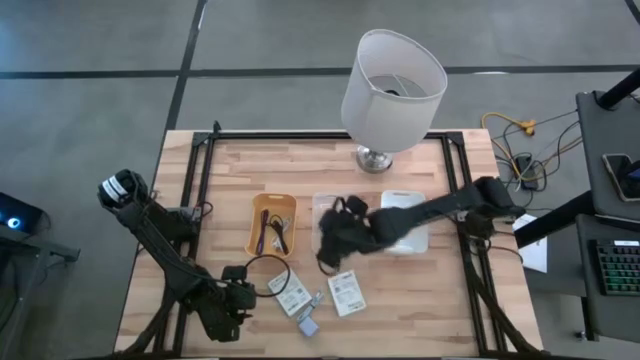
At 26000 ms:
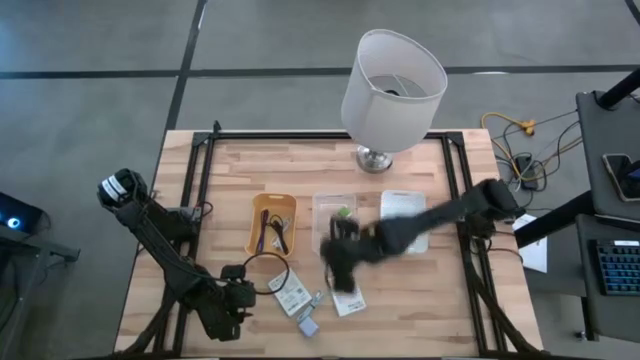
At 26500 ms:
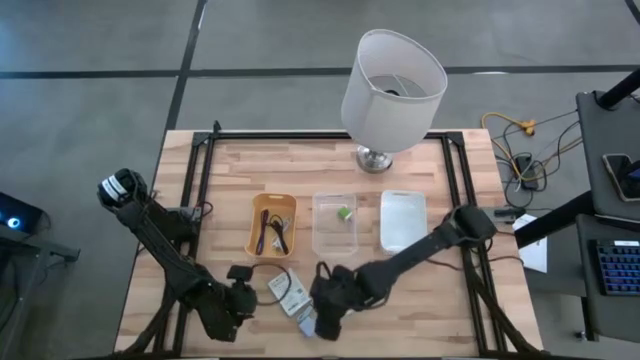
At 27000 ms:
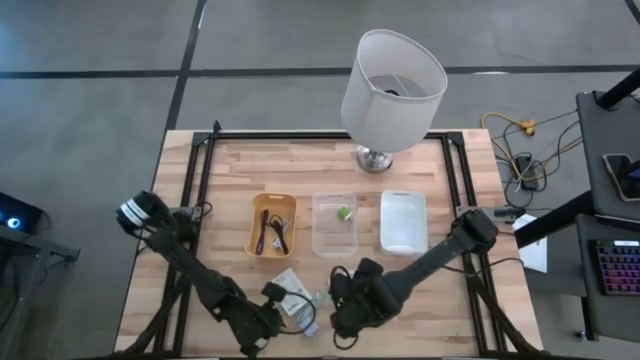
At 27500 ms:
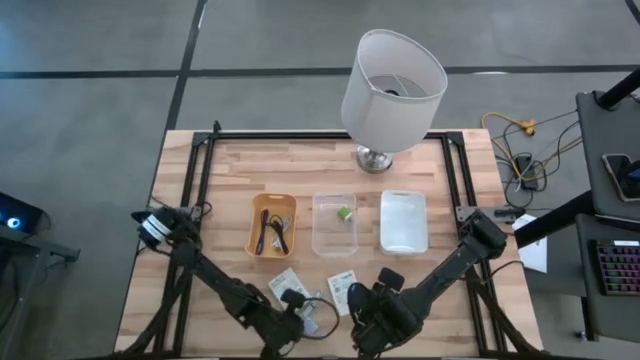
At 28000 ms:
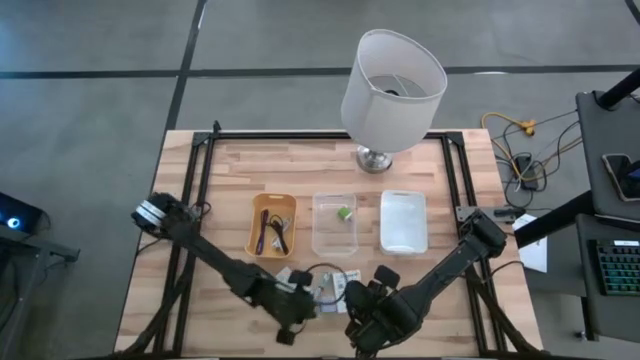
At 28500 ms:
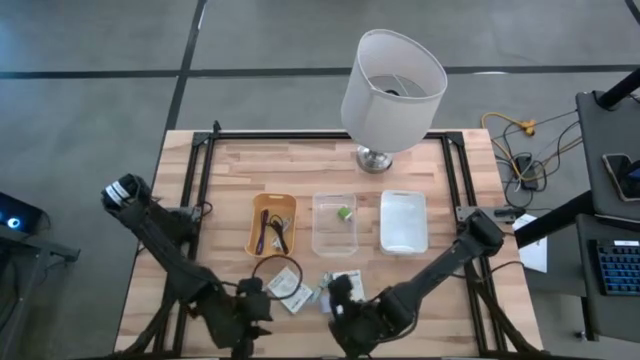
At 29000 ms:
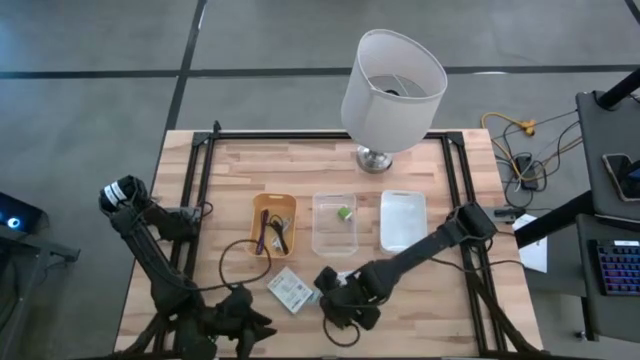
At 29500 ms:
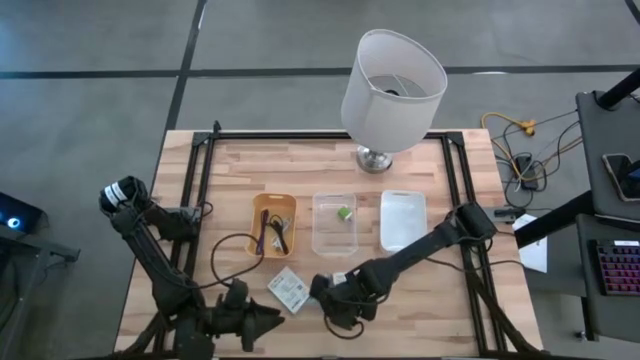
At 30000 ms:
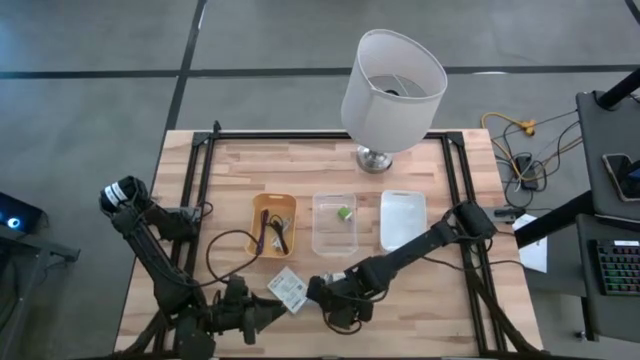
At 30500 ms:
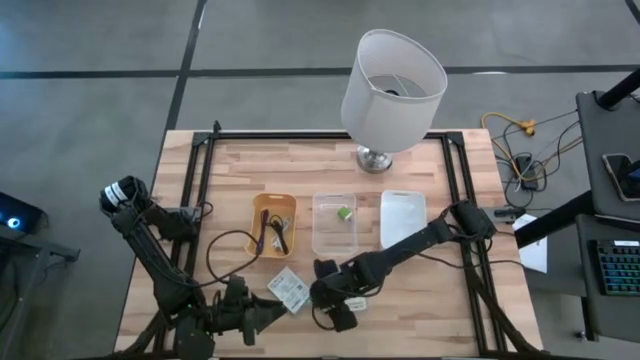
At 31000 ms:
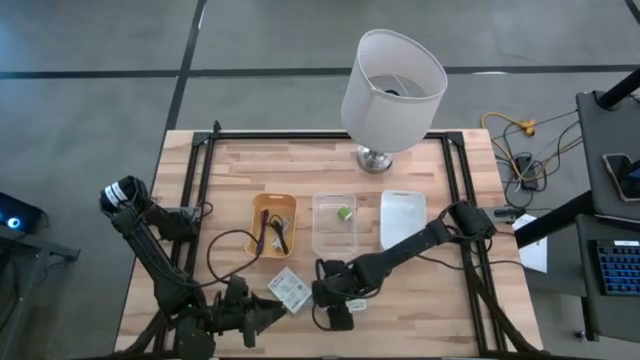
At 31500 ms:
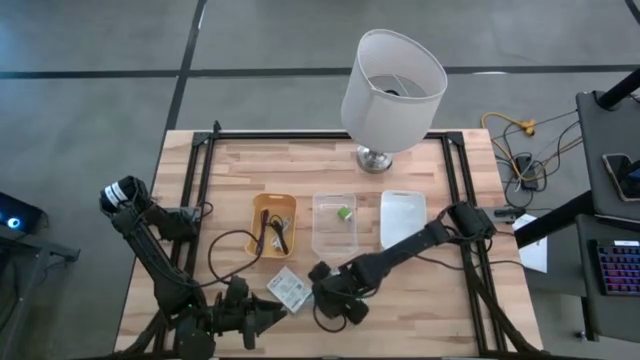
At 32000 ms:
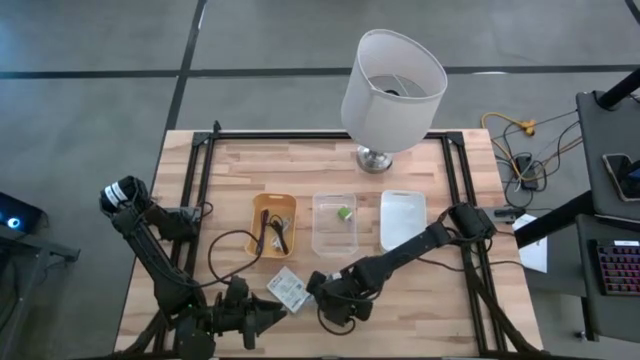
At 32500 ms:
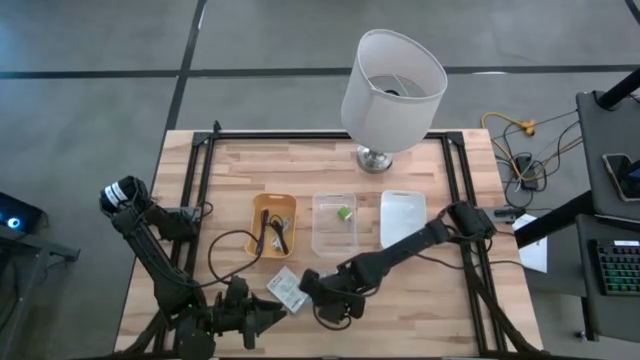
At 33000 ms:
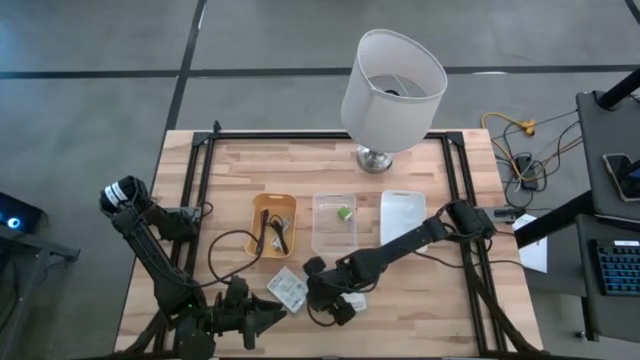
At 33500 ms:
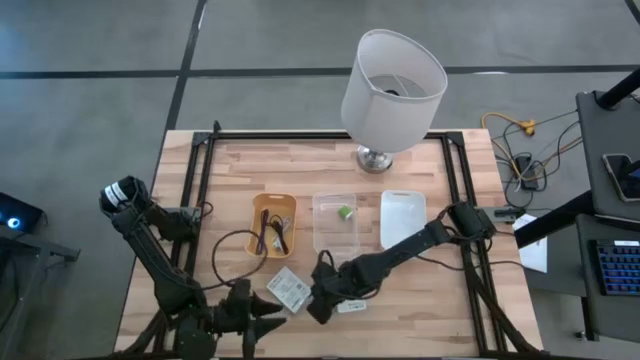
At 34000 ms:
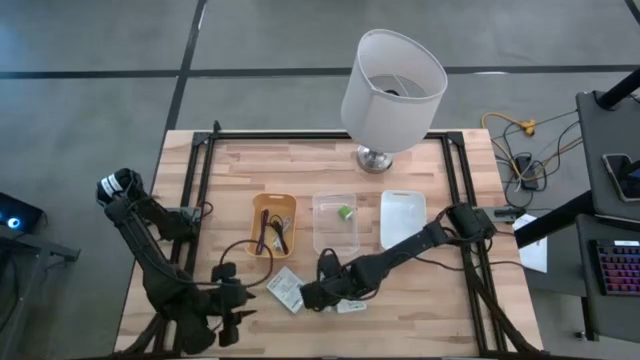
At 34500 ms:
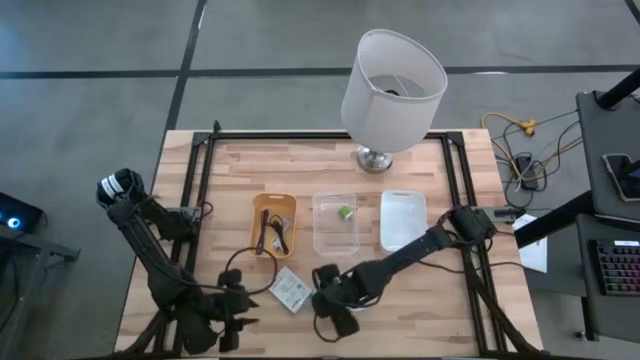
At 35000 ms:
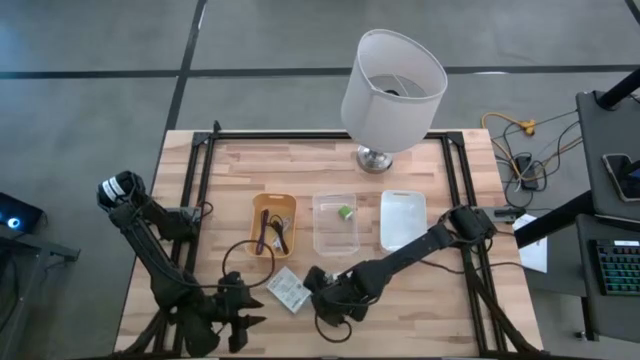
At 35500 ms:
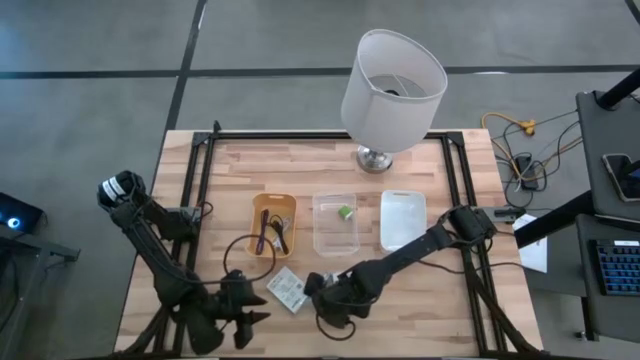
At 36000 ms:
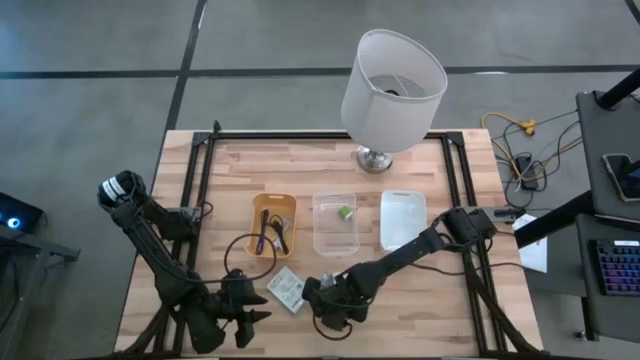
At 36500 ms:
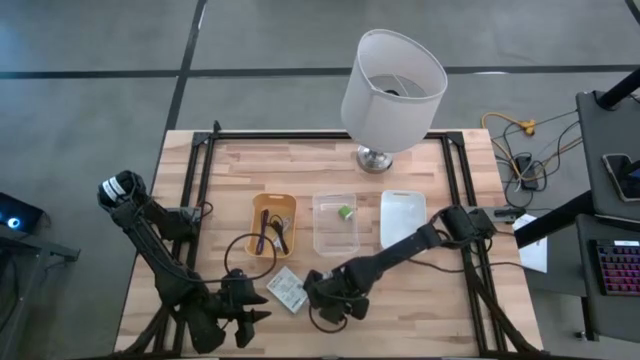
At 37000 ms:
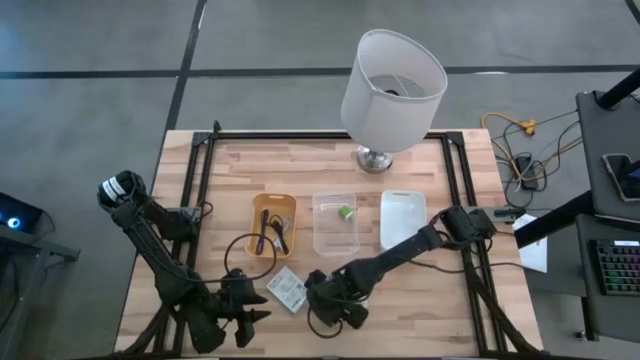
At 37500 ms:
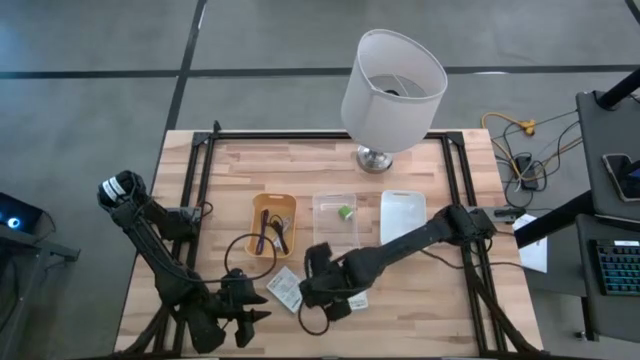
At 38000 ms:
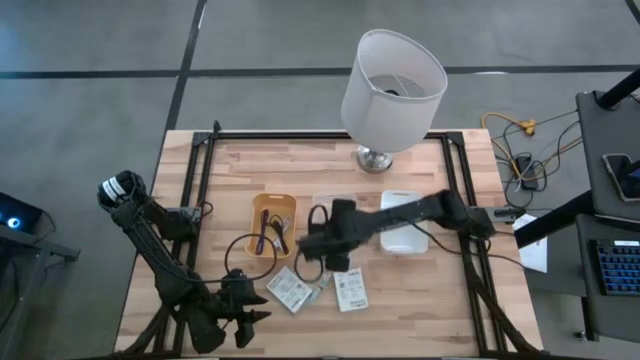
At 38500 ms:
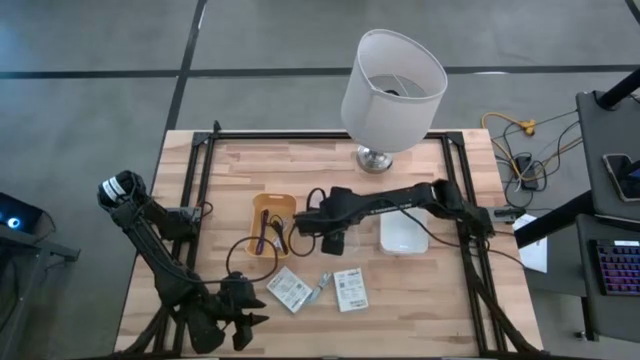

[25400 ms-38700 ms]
Task: Pick and place items into bin
Put the white charger adapter into the white transparent bin

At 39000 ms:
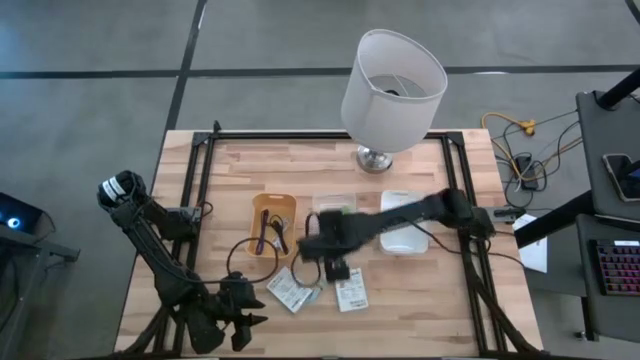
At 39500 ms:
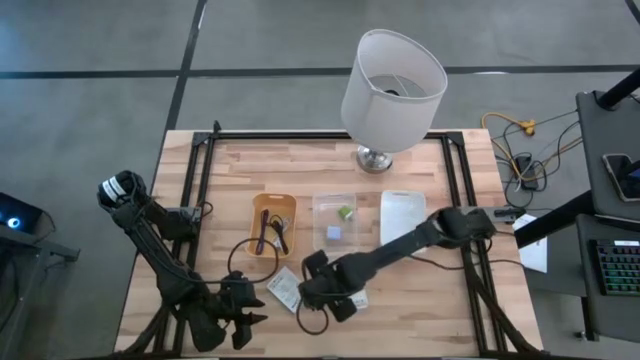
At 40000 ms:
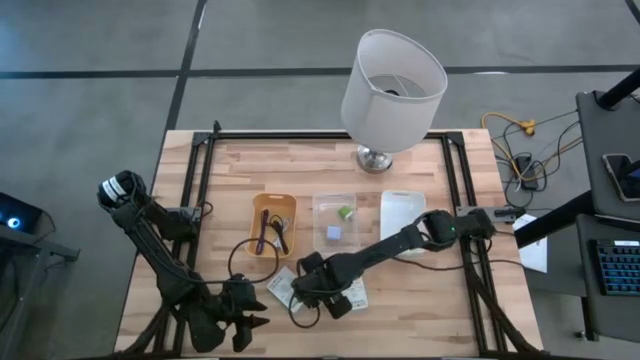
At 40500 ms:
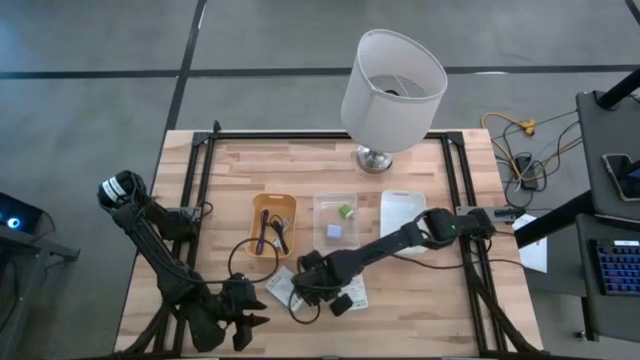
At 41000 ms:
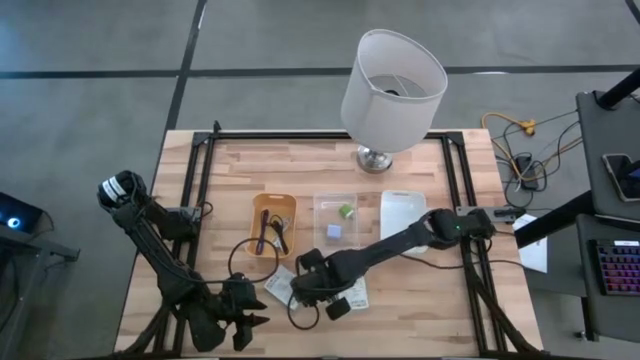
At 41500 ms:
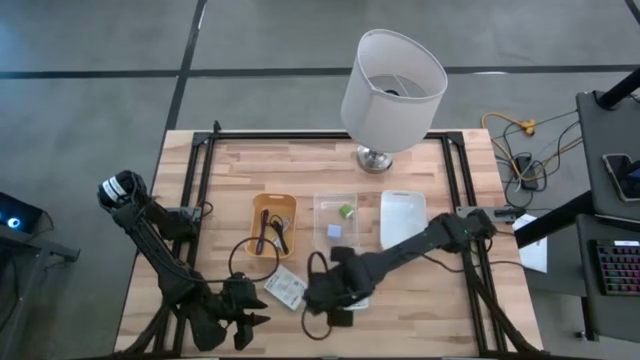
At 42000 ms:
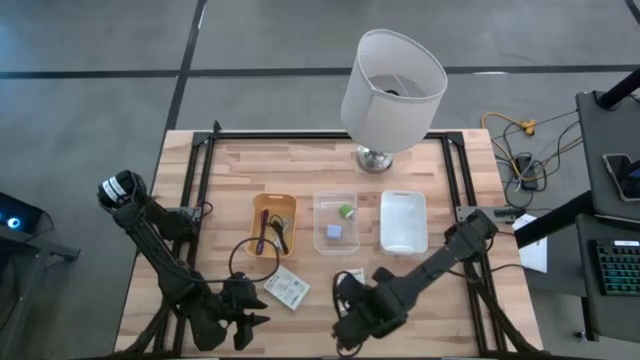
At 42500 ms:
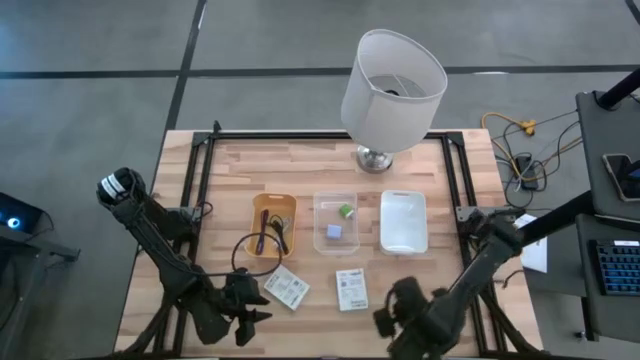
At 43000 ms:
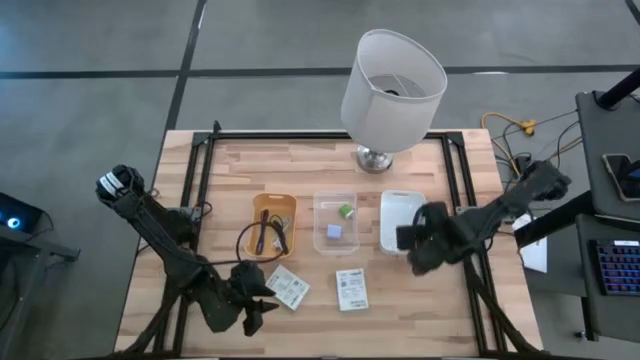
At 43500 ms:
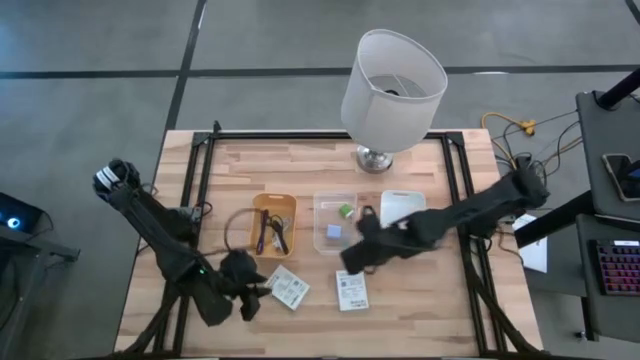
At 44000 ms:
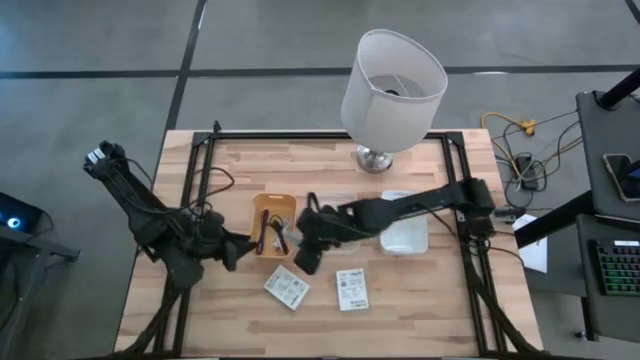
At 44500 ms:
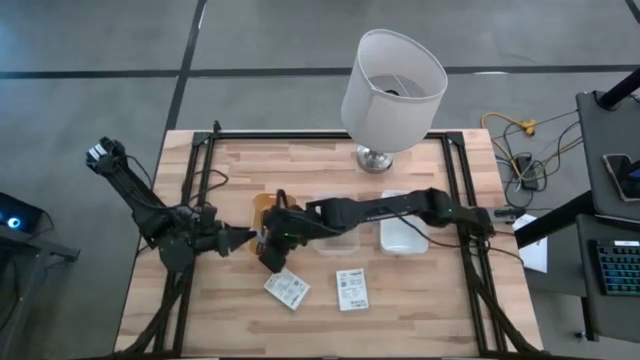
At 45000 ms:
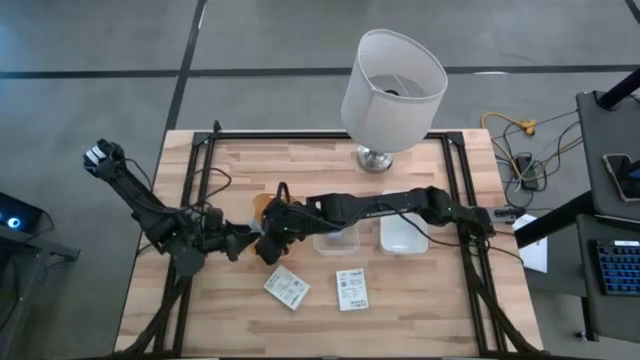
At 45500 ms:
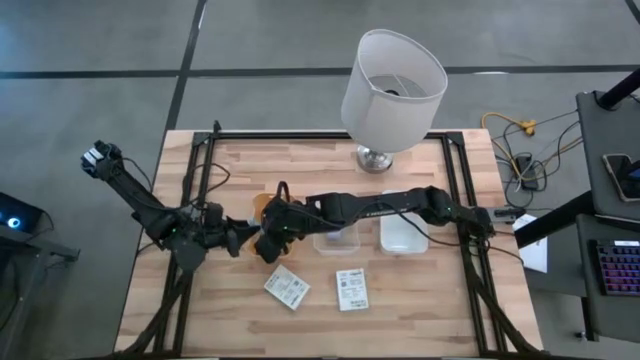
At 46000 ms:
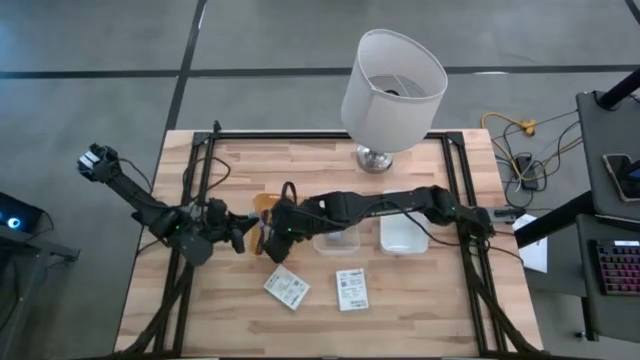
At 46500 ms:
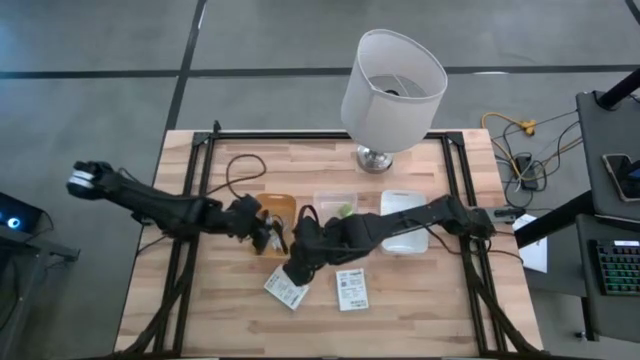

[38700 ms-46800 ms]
Put the light blue charger cable into the yellow bin
